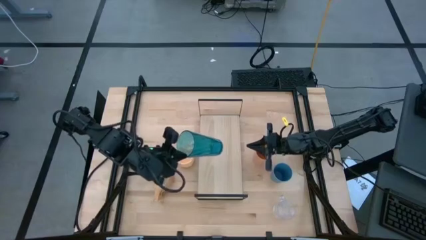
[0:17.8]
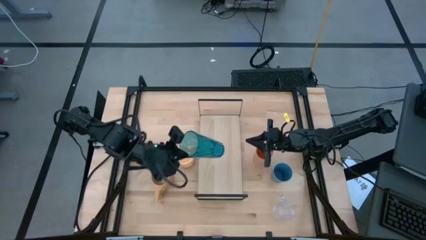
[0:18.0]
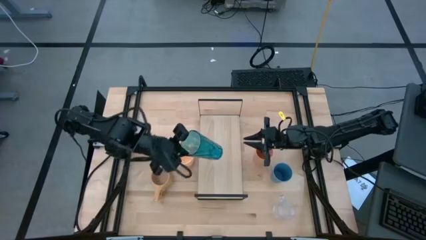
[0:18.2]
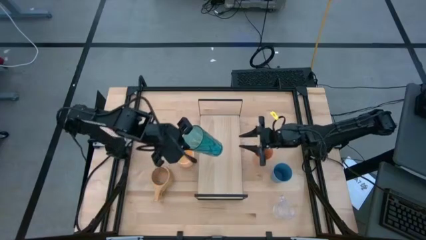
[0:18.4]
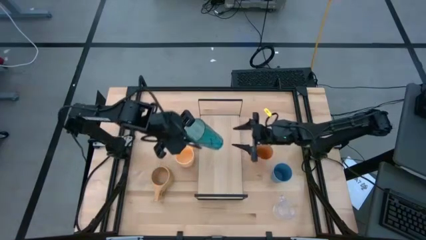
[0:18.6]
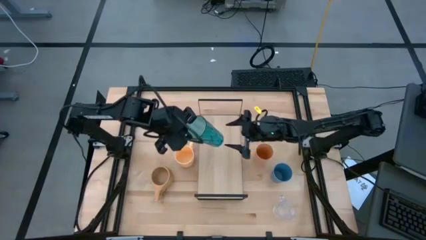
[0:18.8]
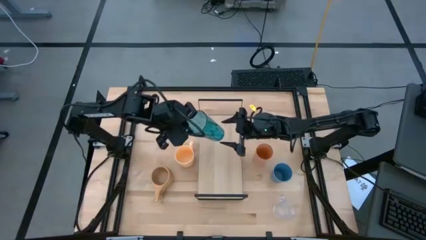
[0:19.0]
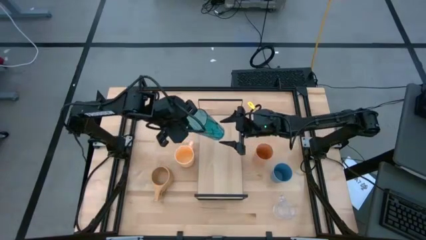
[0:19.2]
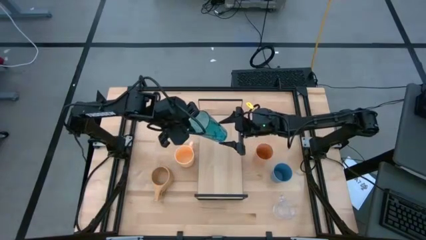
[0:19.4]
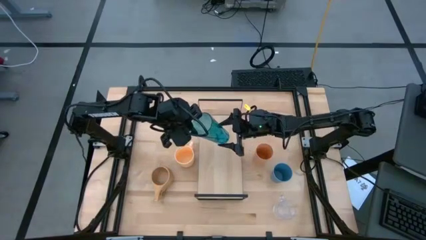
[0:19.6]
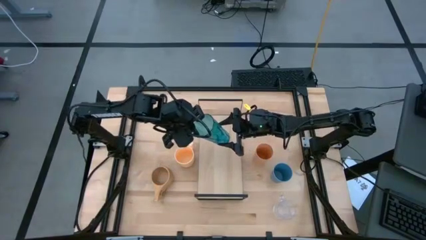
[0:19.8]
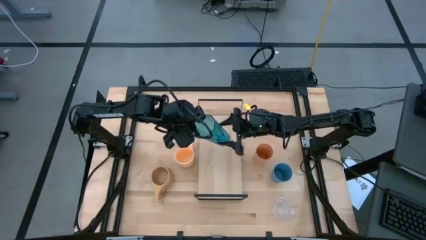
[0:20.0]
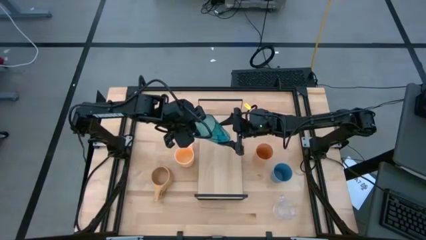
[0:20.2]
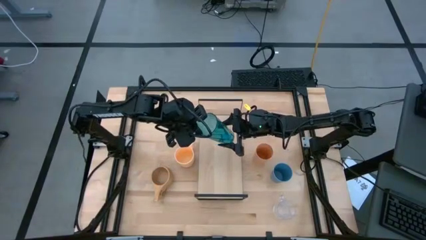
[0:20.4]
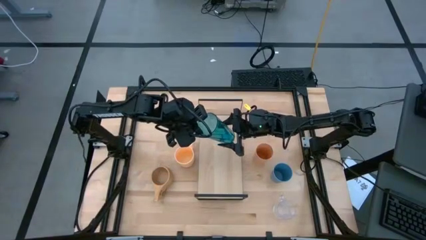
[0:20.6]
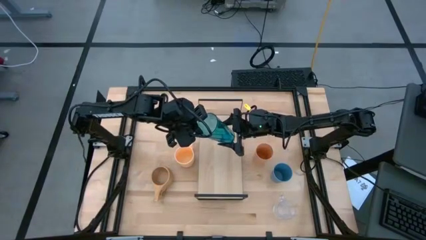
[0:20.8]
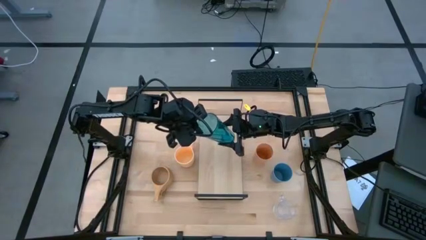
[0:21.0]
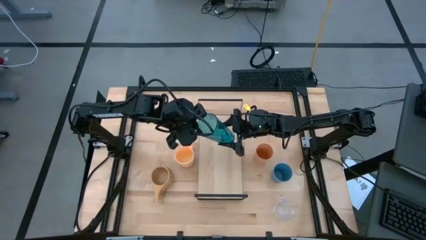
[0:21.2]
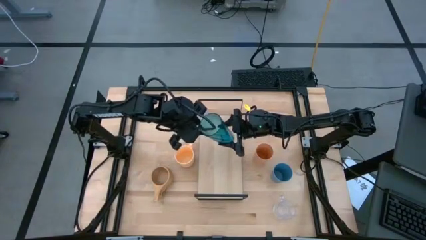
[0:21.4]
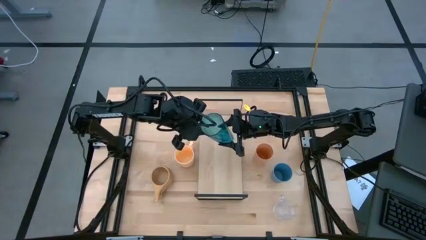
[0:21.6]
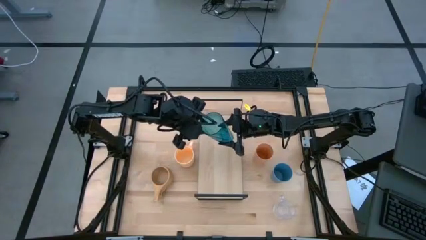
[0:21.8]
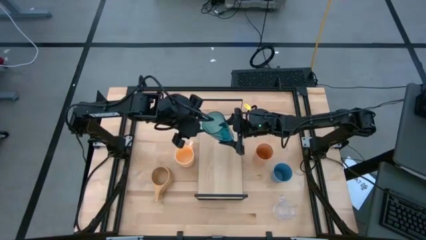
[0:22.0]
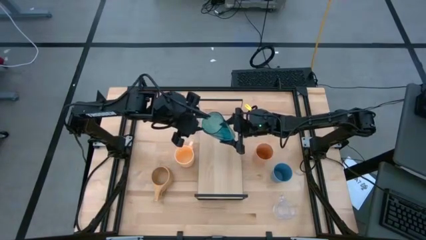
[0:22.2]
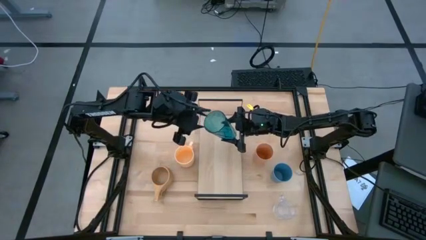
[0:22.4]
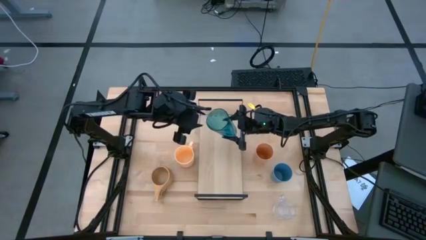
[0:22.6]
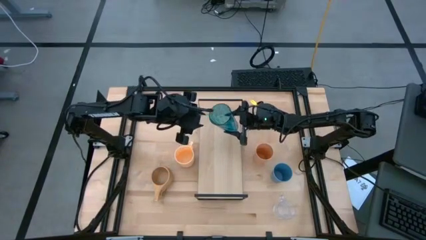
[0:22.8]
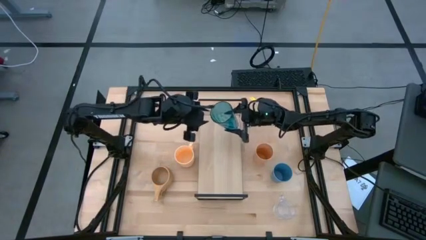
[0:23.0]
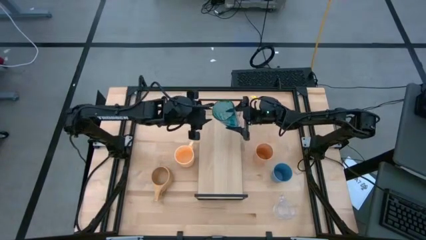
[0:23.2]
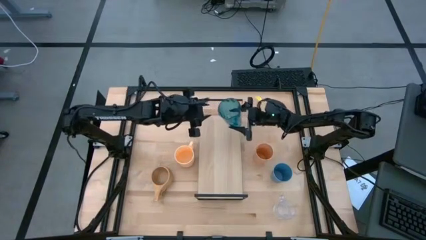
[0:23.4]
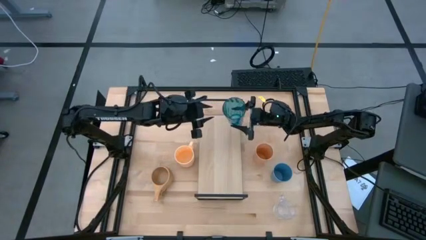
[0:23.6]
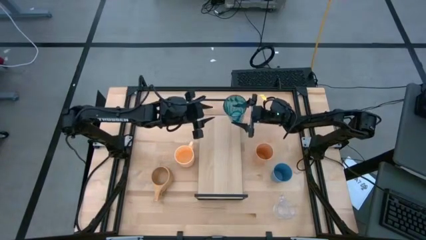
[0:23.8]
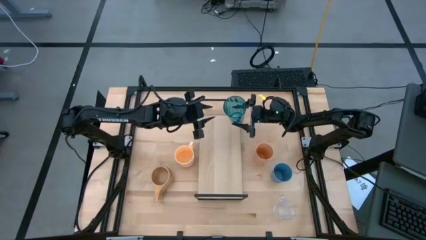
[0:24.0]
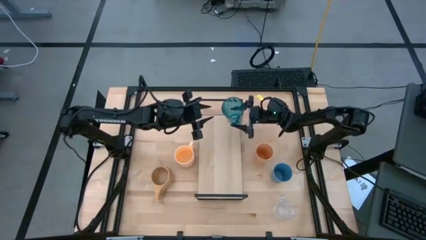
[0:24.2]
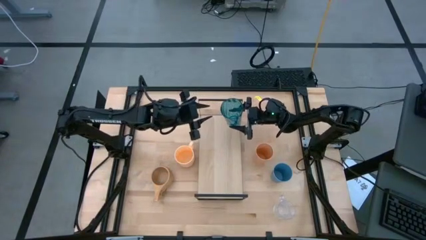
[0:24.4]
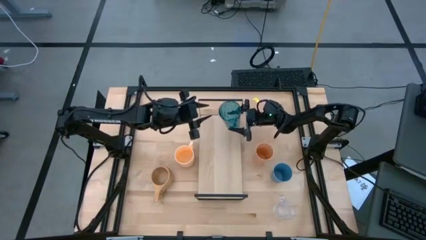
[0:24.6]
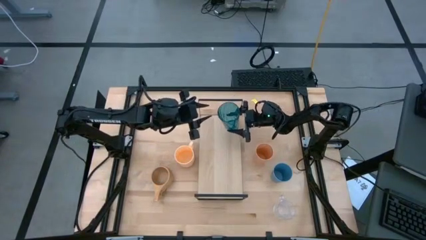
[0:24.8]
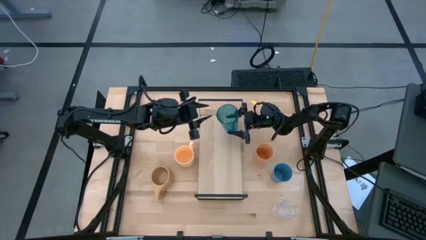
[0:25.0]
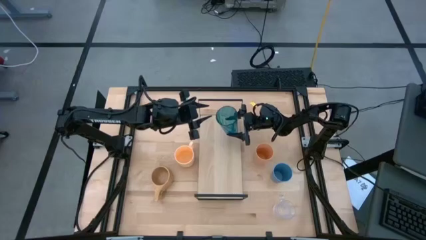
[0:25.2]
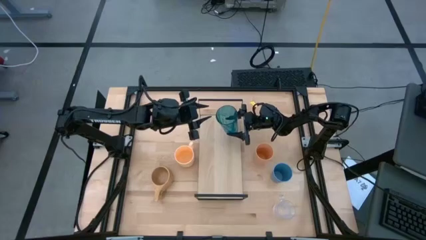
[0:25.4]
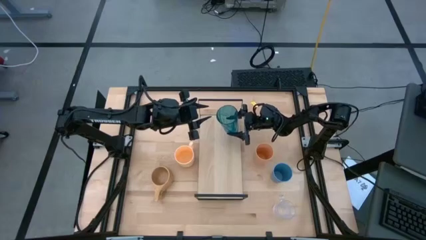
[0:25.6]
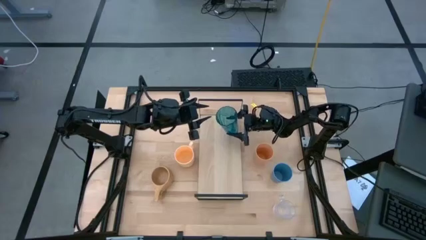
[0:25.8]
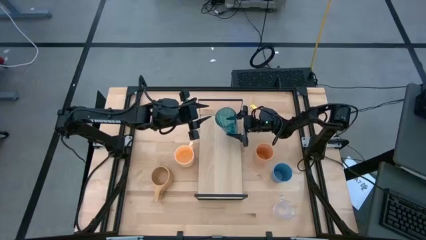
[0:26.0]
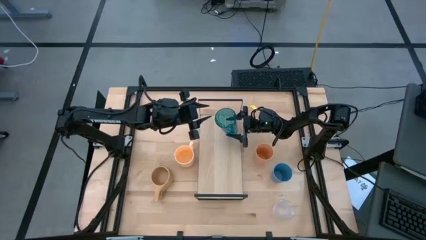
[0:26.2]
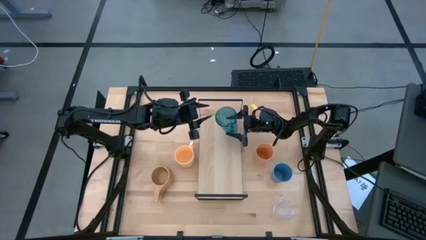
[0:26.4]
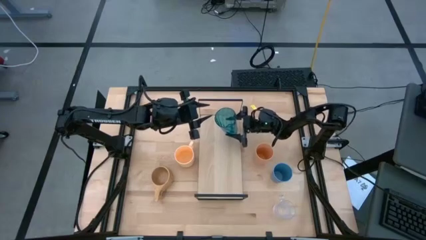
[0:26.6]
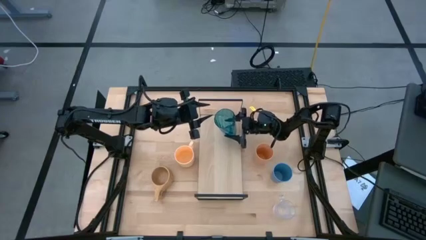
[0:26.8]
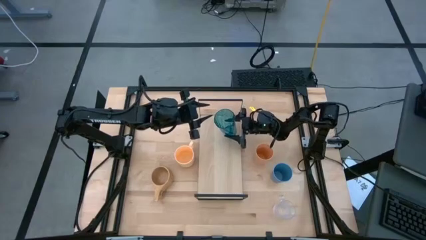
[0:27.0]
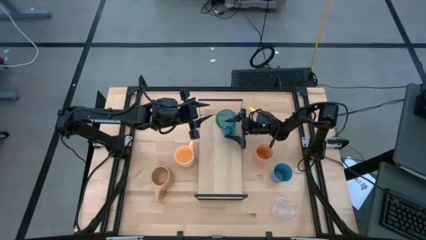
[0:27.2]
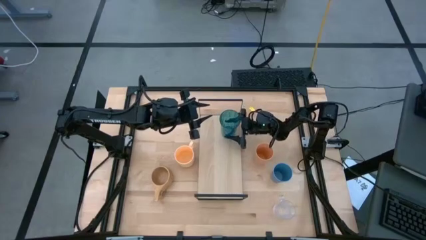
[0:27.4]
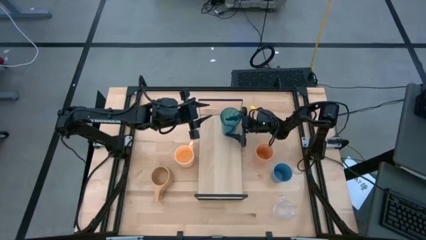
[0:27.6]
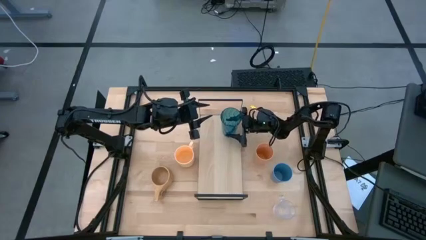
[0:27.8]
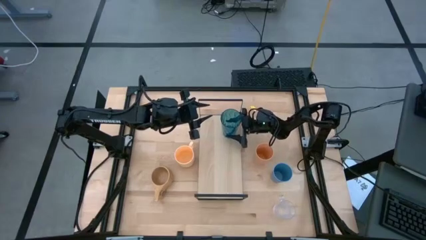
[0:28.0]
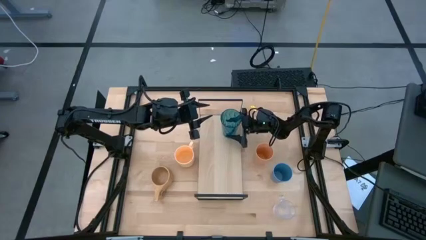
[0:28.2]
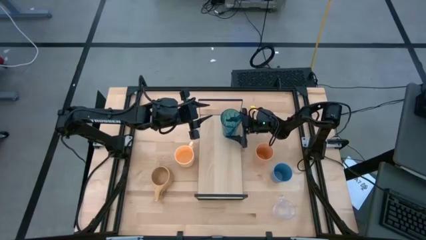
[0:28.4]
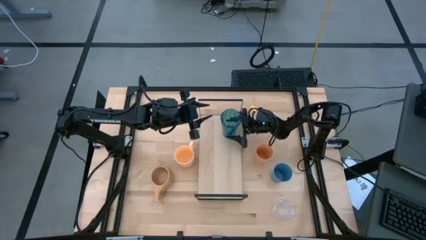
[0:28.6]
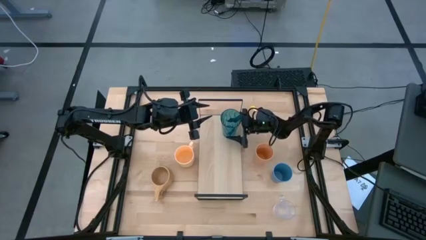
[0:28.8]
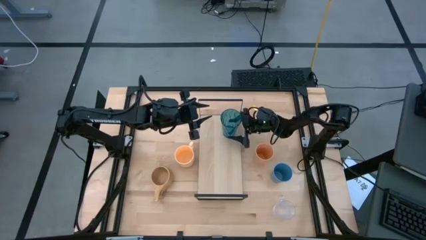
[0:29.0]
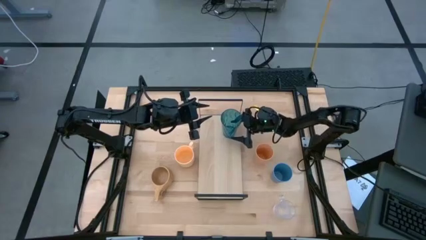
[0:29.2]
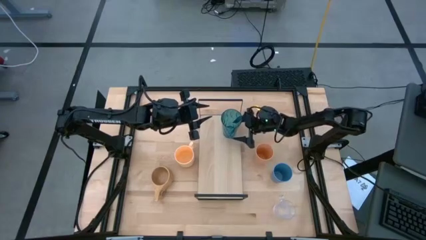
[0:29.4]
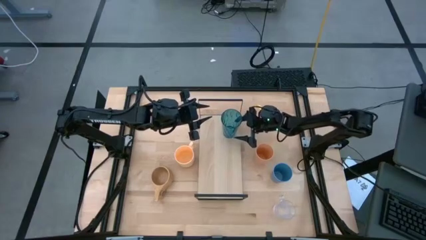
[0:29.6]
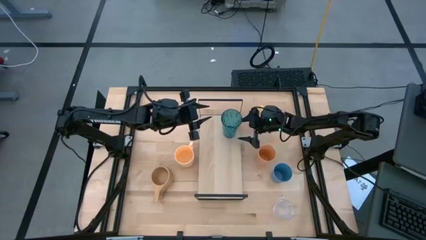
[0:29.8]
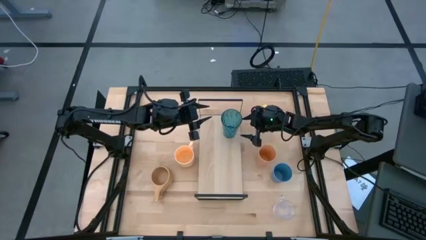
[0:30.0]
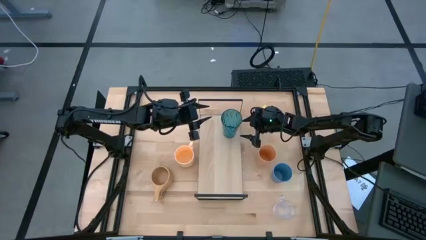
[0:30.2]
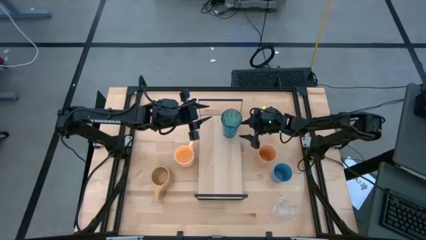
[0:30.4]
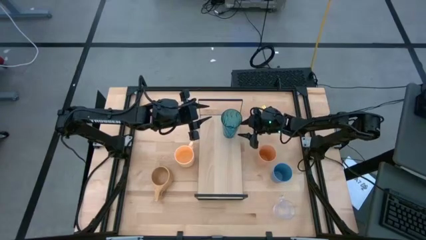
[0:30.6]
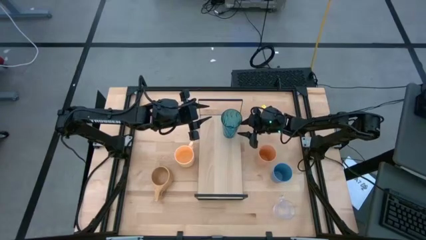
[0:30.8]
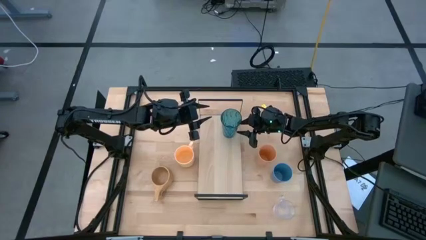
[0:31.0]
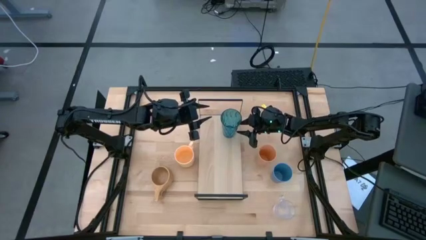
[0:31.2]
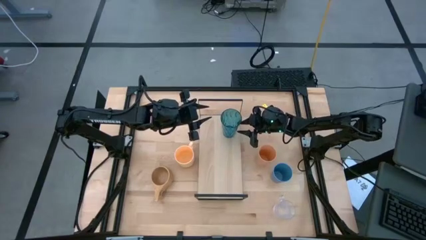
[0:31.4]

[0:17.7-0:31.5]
Task: Stack small to large cups/mugs on shelf
Put the light blue cup on the shelf

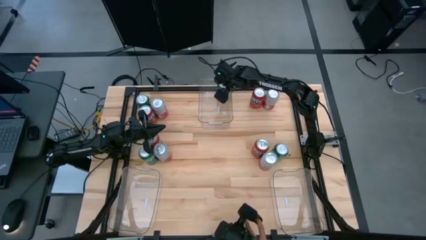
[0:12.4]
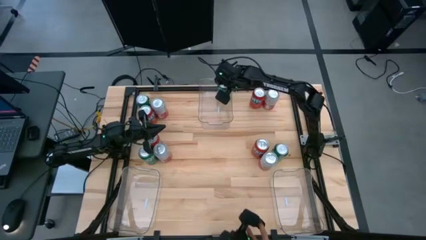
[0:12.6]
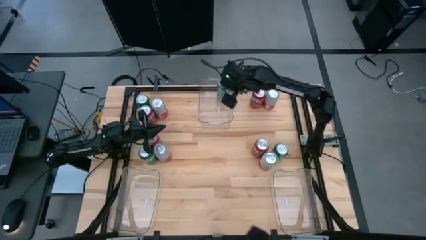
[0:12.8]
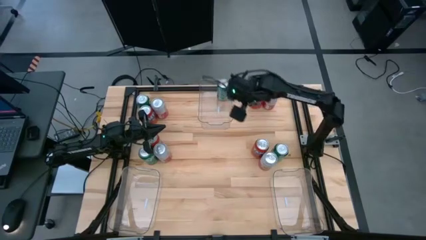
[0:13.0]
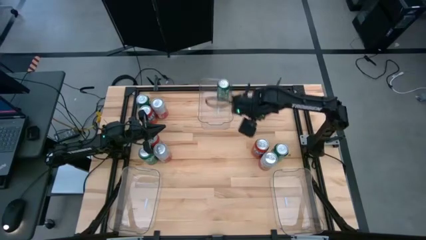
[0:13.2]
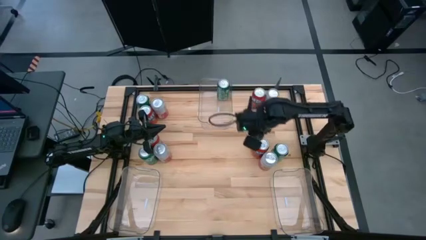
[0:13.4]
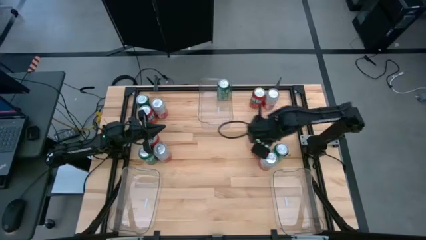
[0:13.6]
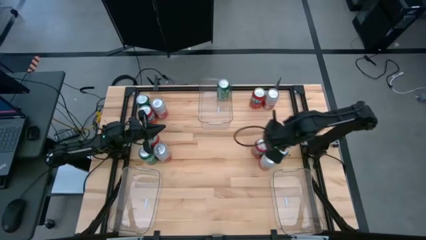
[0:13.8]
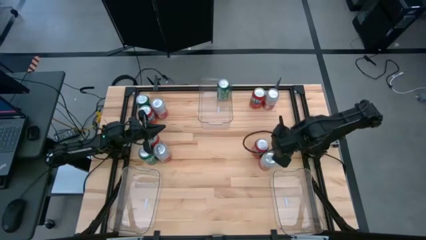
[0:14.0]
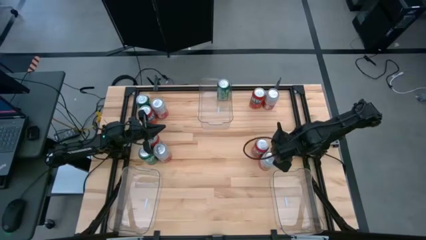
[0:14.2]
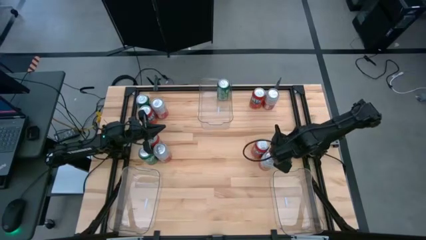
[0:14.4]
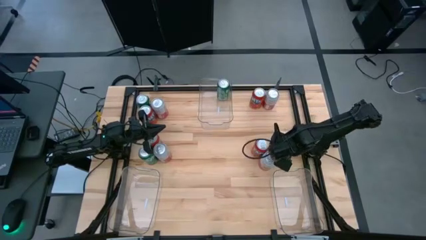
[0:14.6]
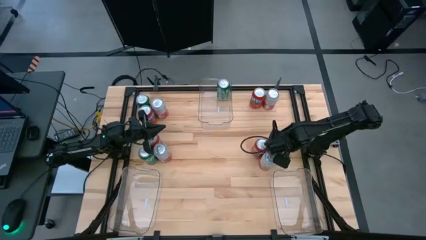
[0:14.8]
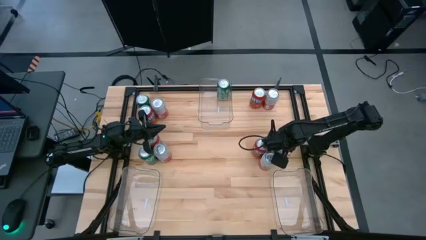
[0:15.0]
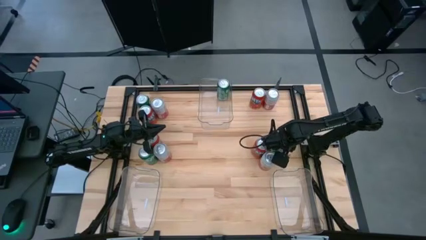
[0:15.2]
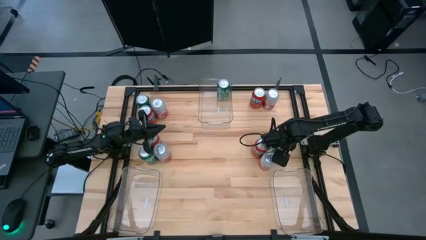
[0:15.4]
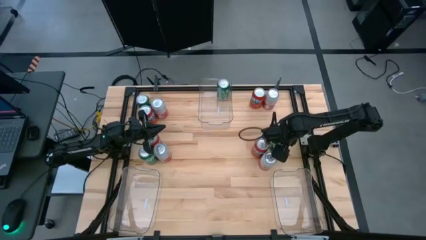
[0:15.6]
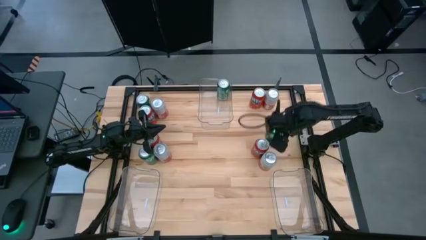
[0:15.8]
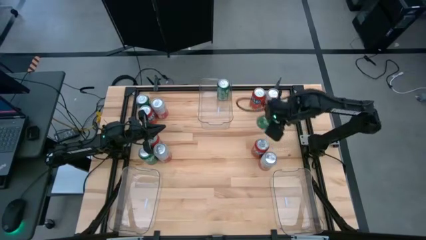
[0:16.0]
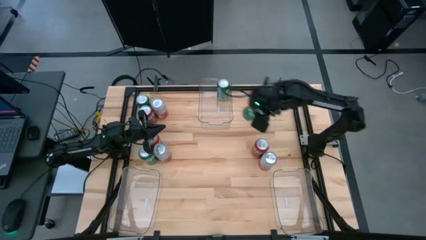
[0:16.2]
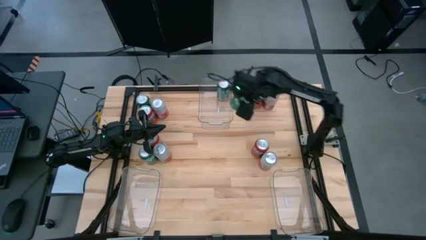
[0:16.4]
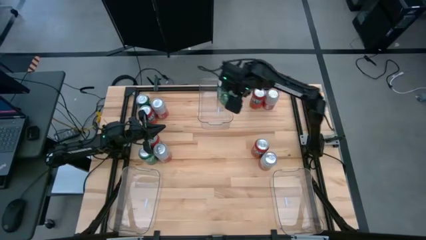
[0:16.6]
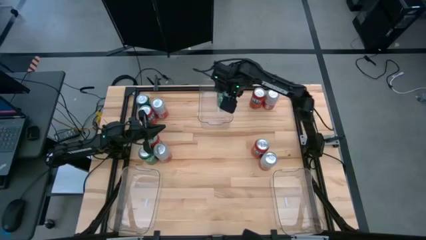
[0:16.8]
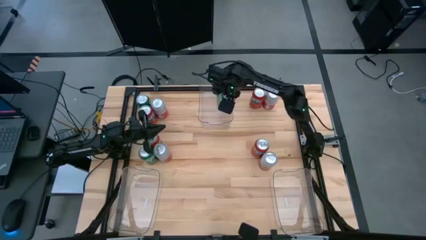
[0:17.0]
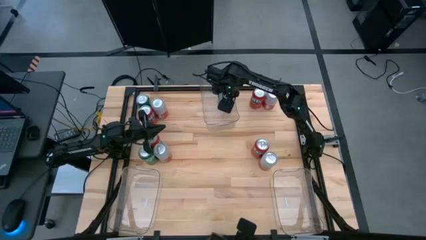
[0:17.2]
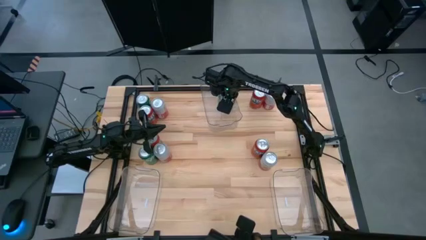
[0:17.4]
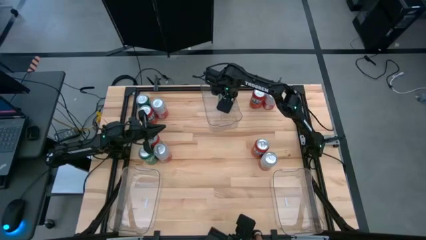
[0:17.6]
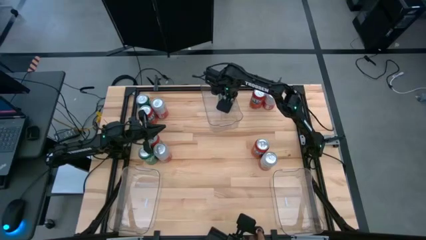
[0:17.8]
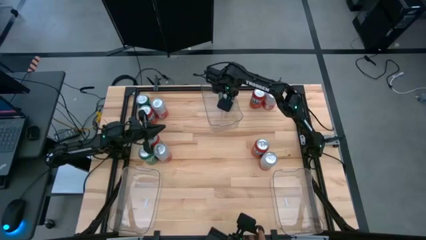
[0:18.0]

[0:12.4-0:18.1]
Task: Sort soda cans
Put the bottom right green soda can into the top transparent bin
